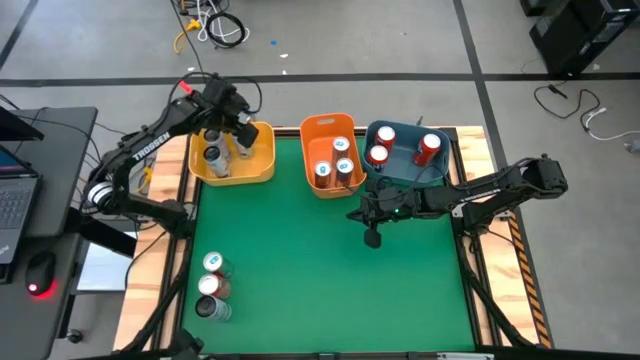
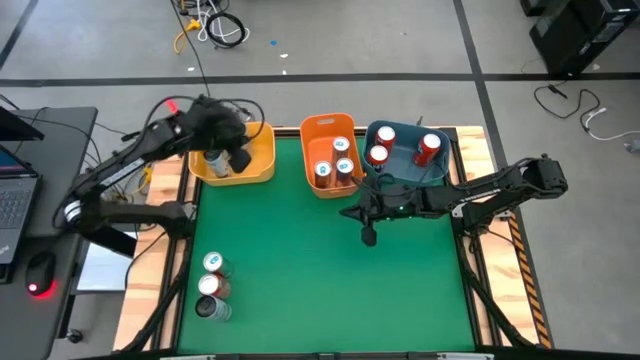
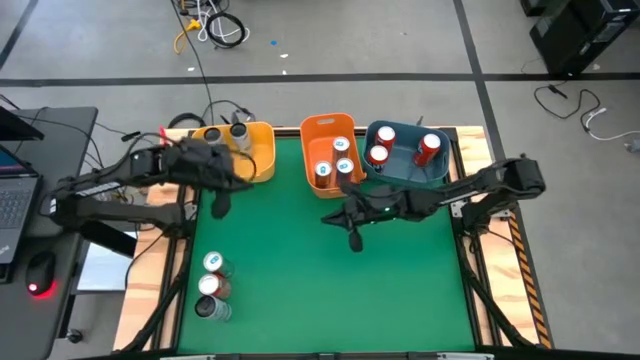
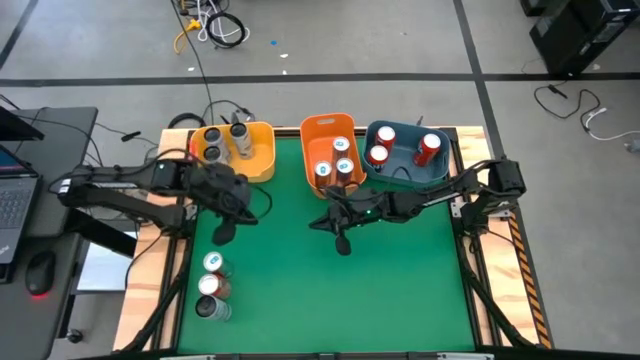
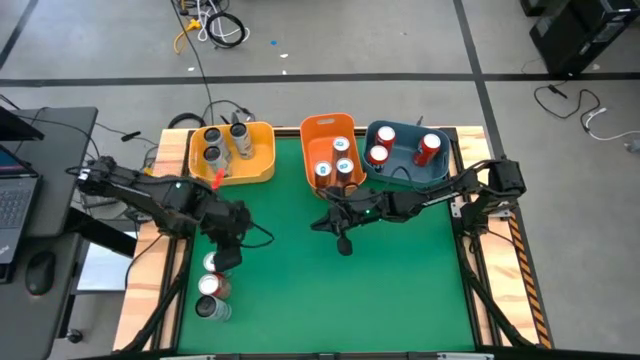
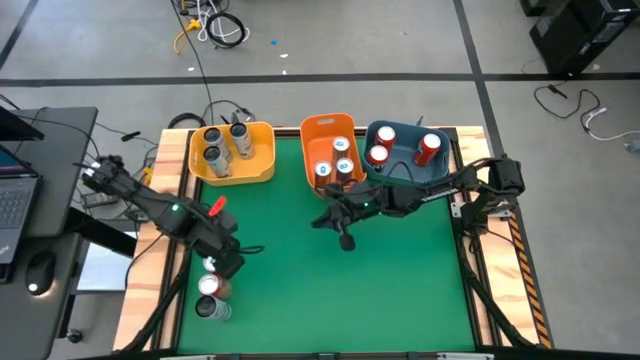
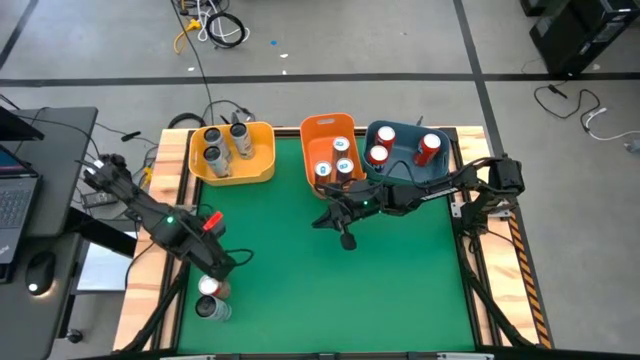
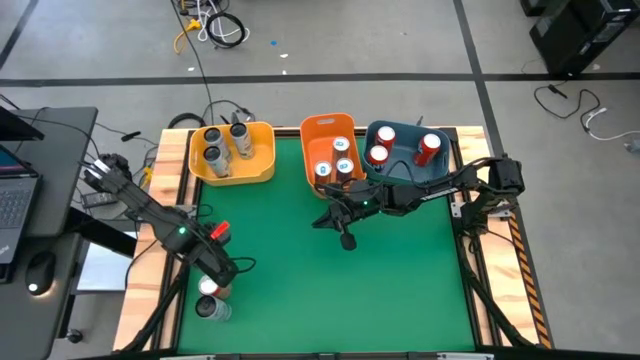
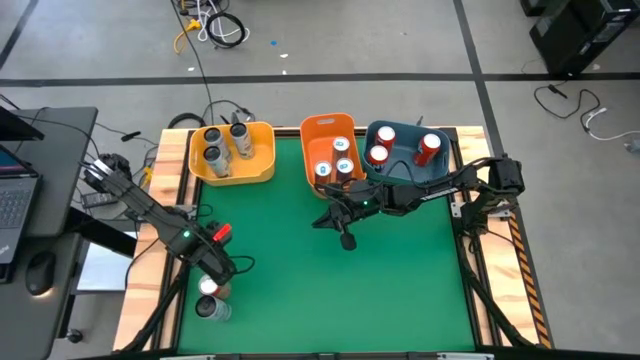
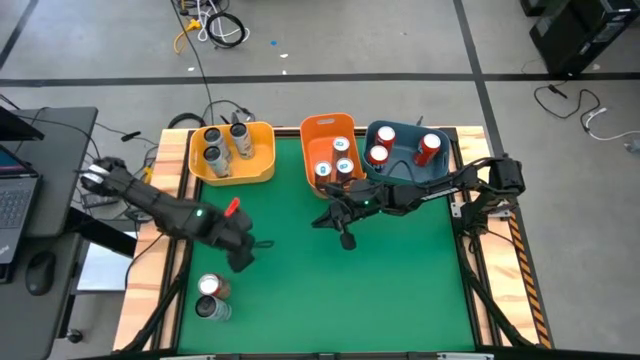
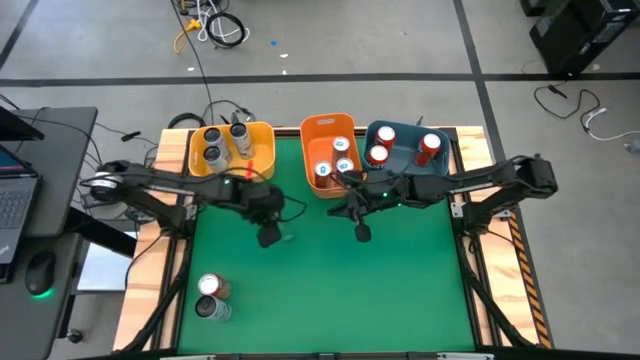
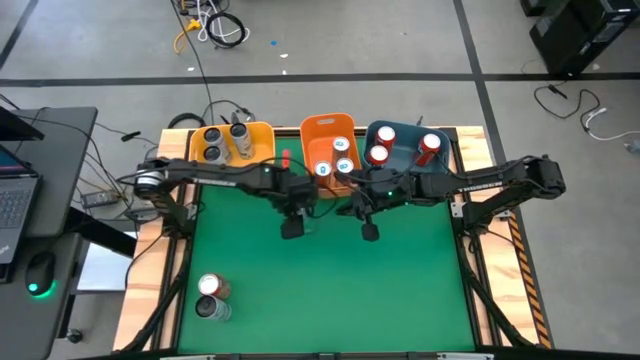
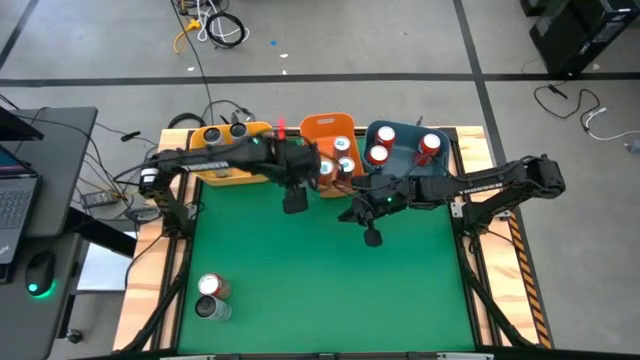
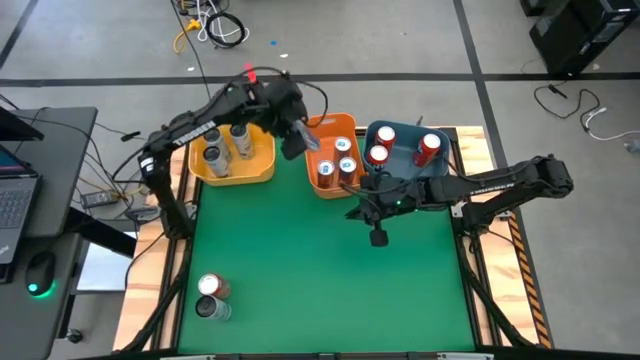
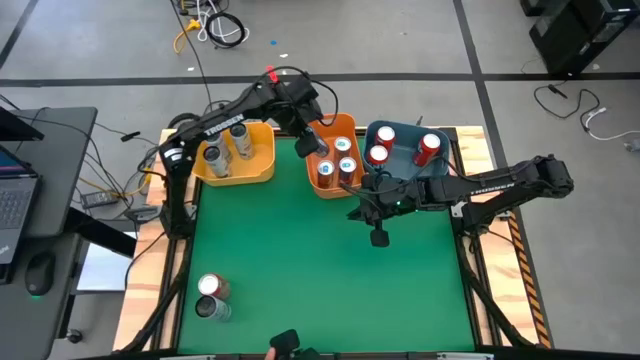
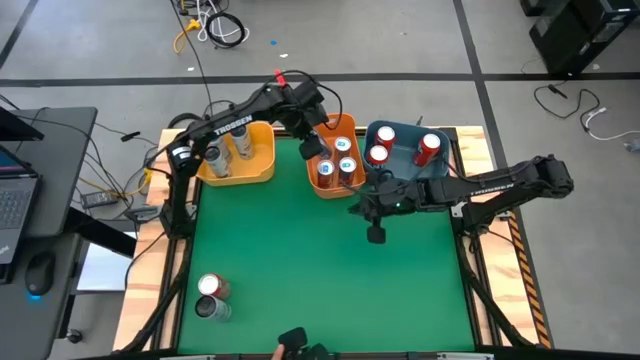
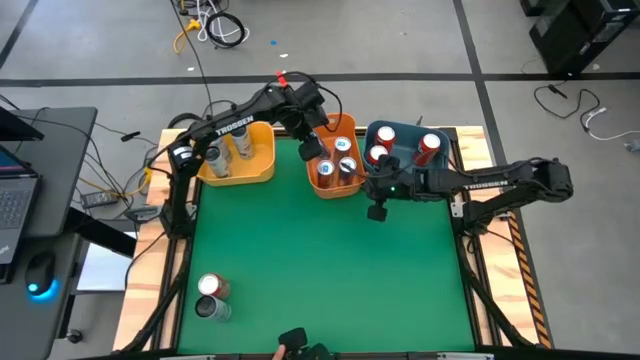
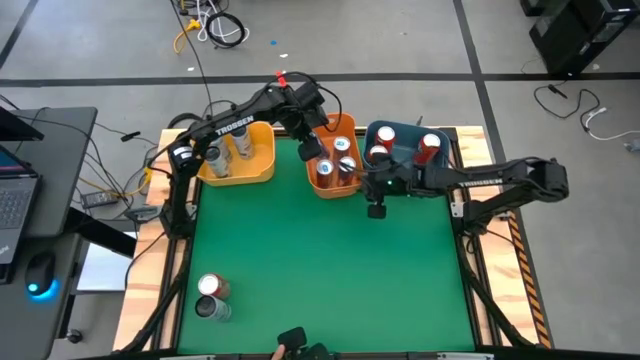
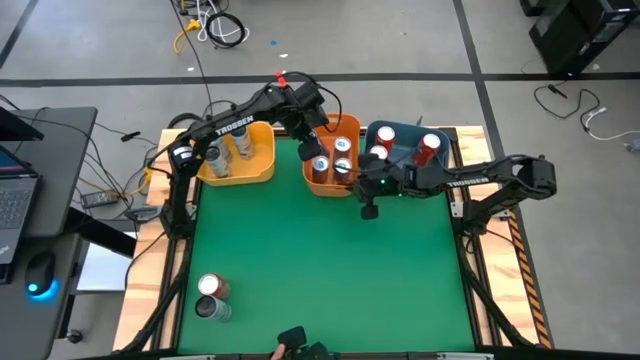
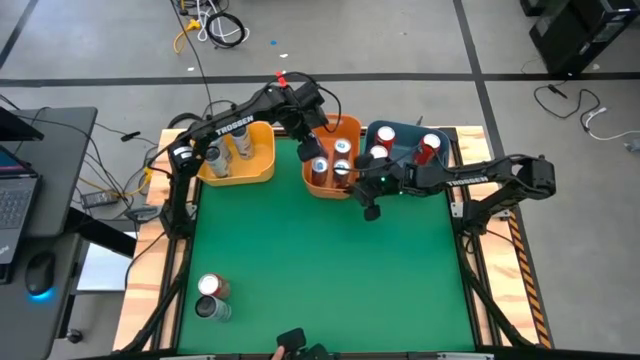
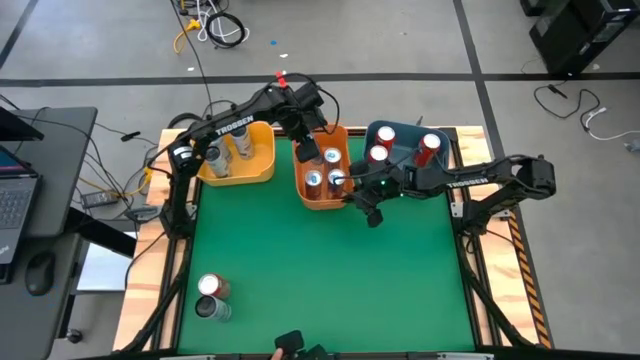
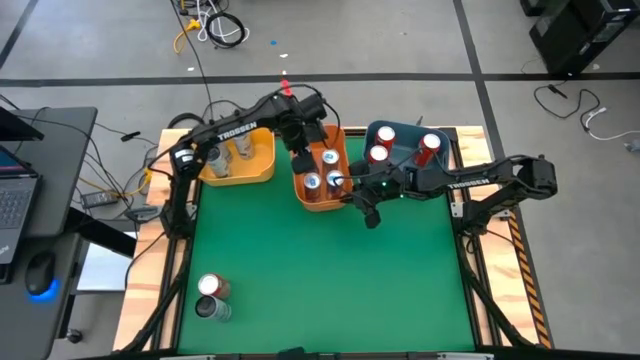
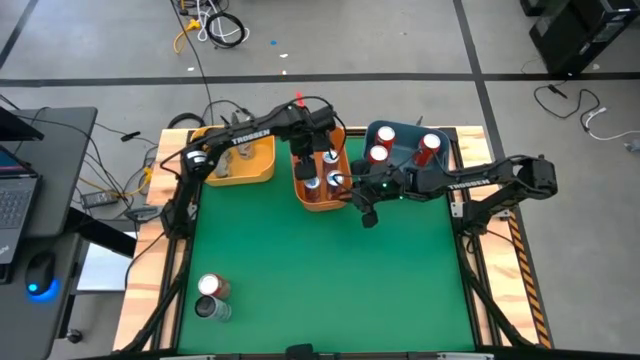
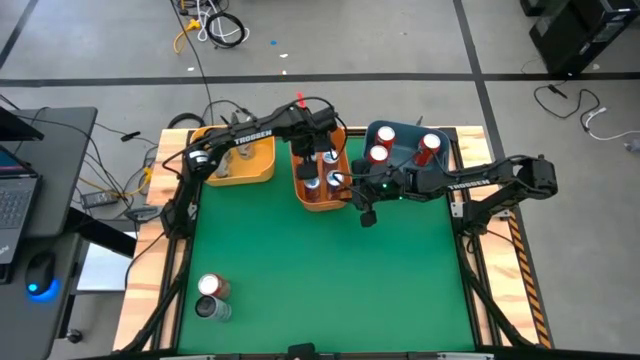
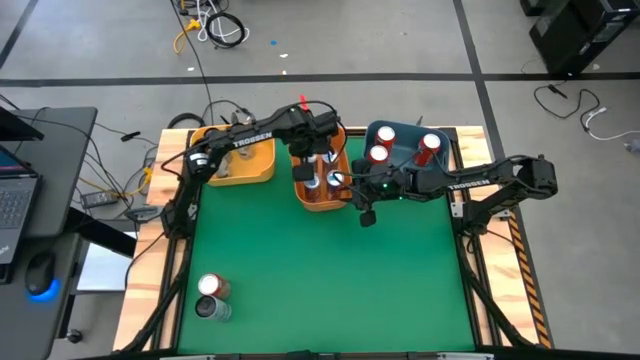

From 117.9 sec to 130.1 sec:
Task: Sort soda cans
Put the blue soda can into the orange bin

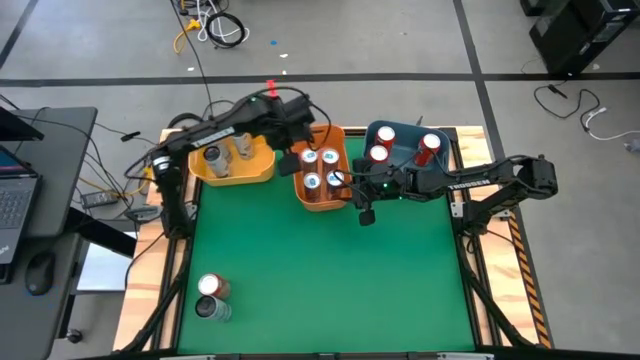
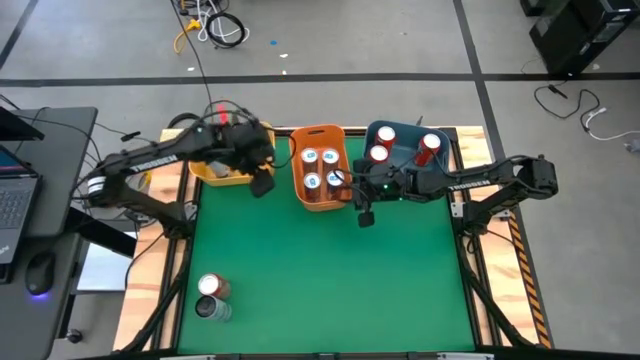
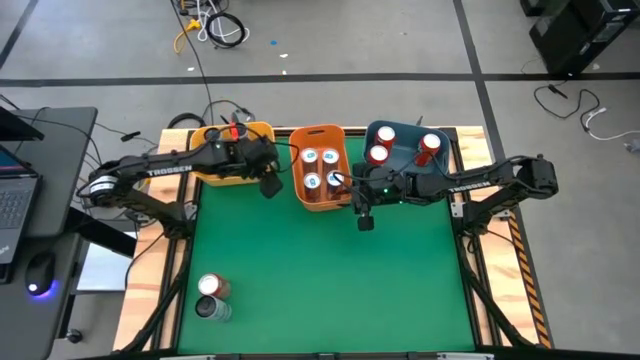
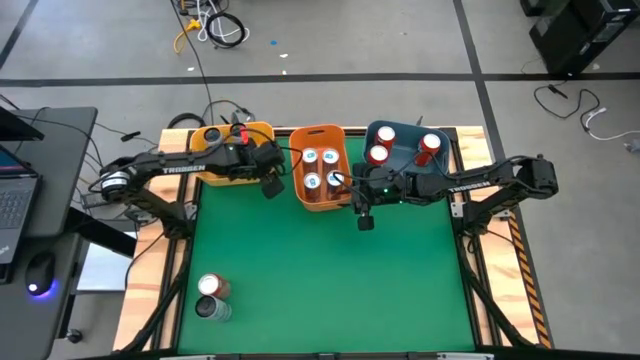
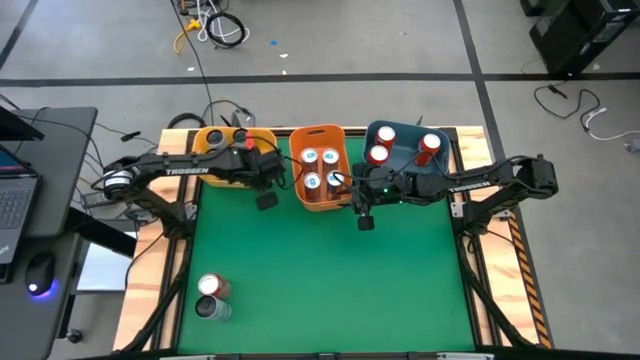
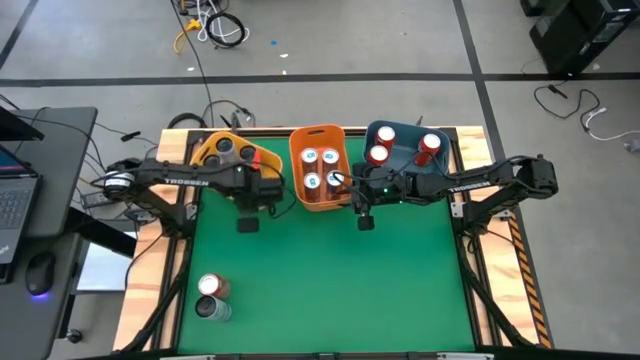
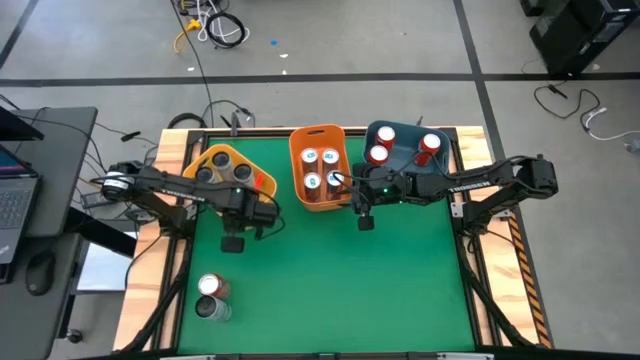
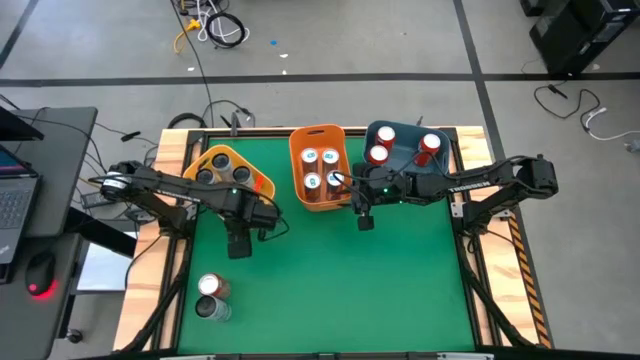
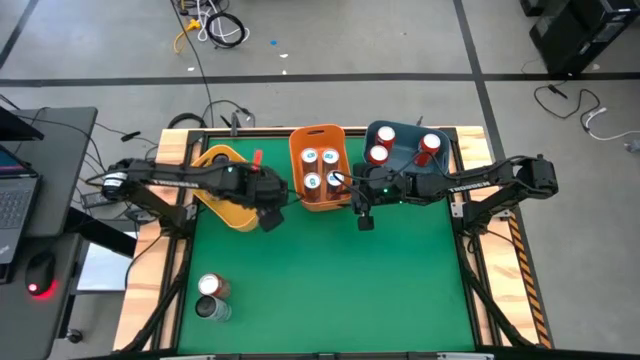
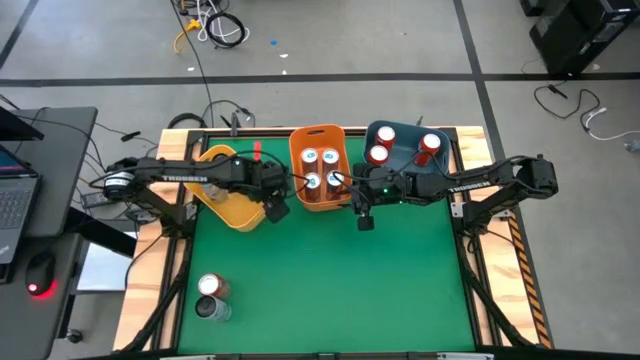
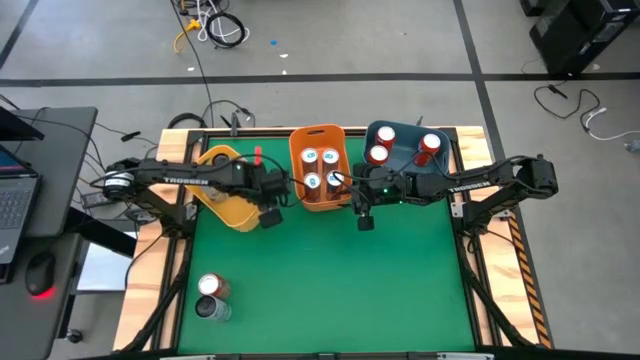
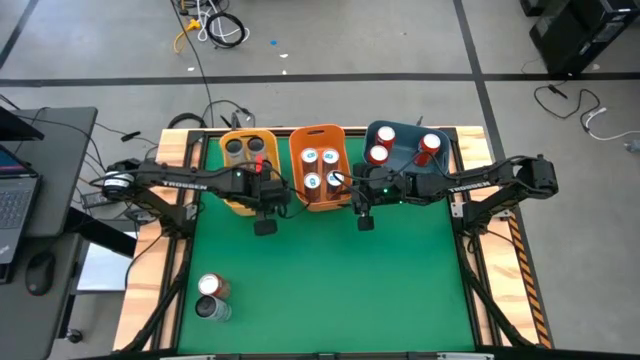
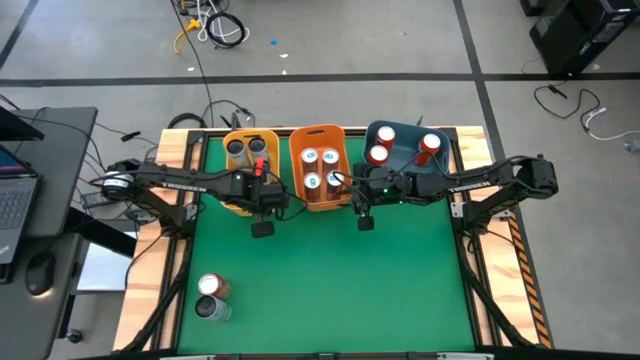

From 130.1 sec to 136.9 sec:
Adjust the yellow bin

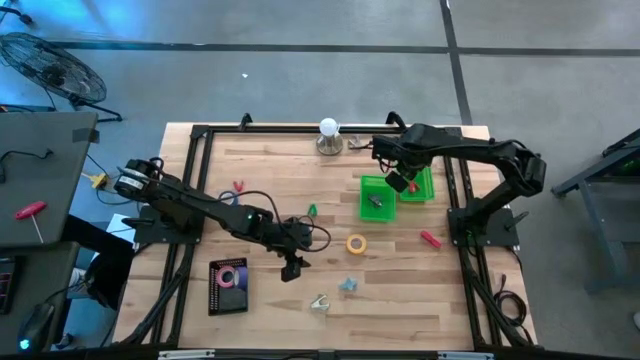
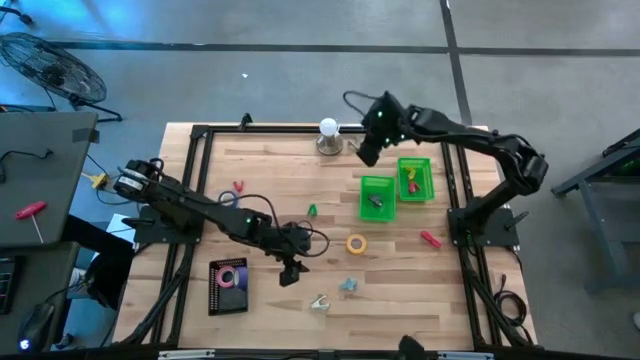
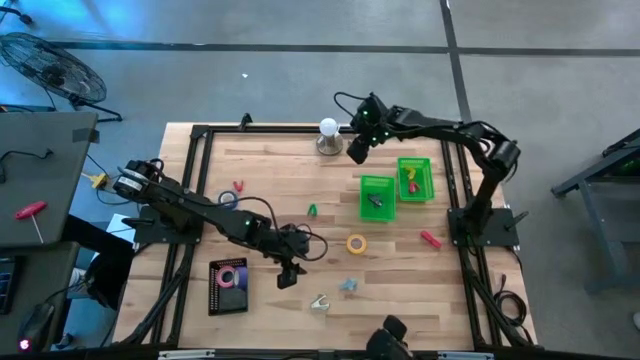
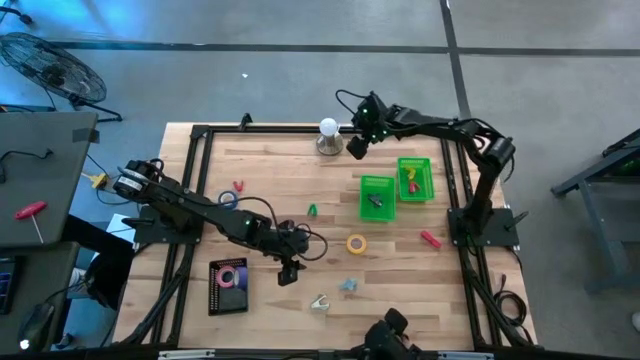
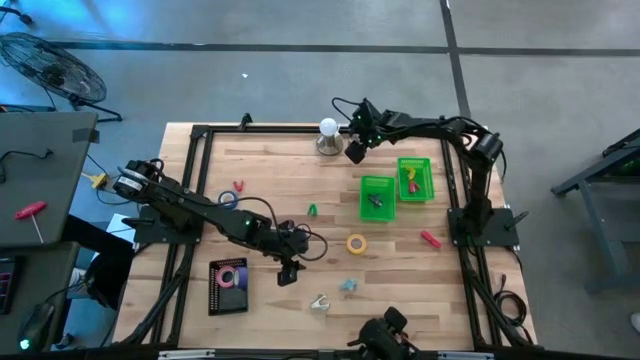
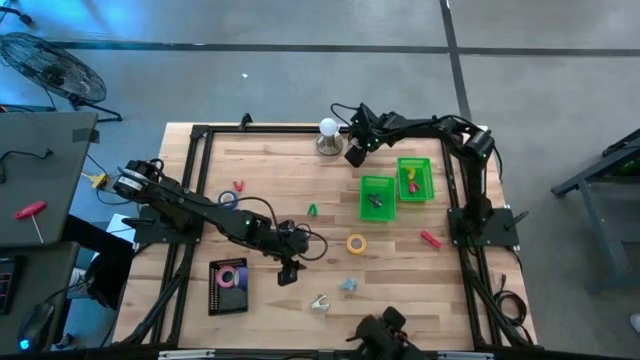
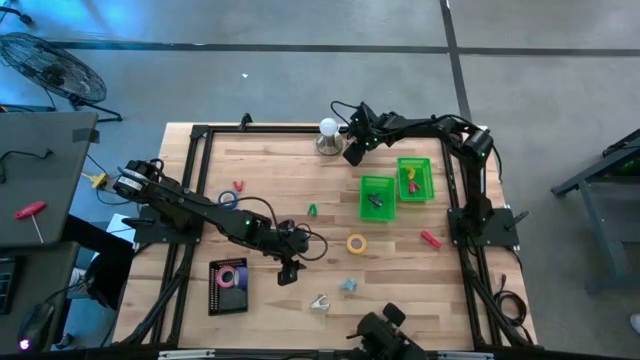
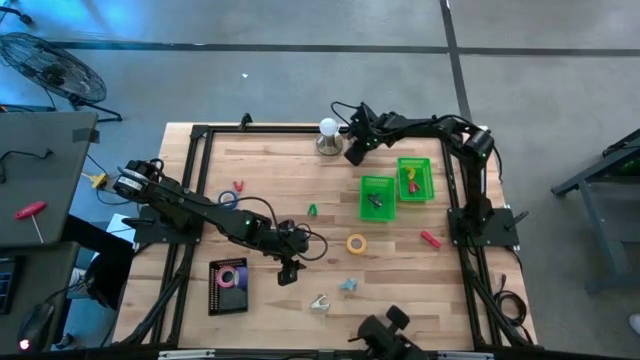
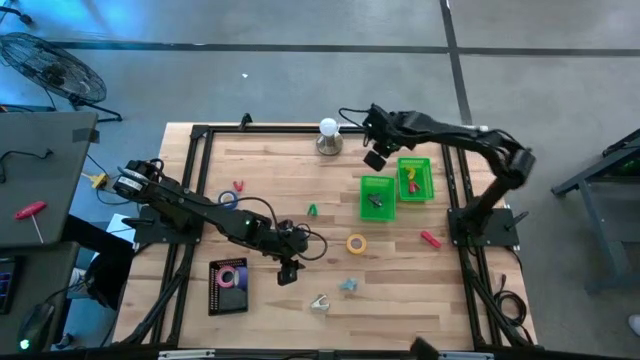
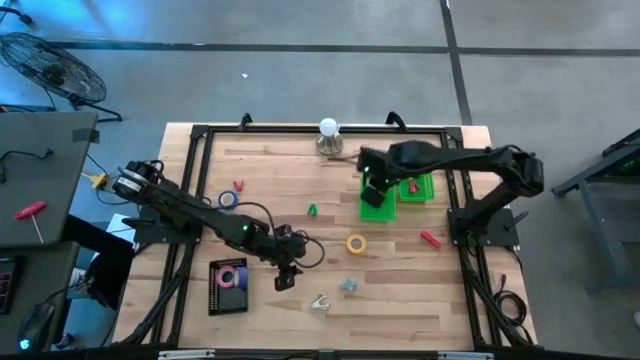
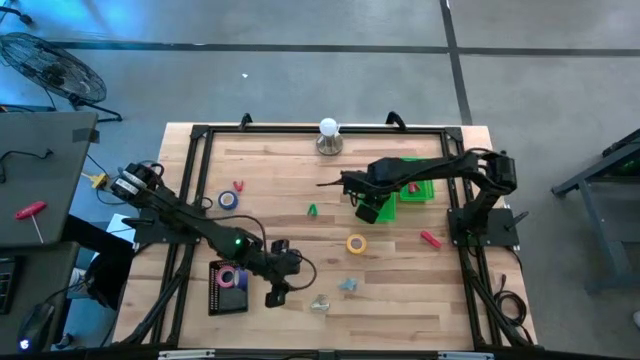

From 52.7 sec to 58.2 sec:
Task: Pick and place Stapler, Stapler remover, tape
Put the top white staple remover into the left green basket
